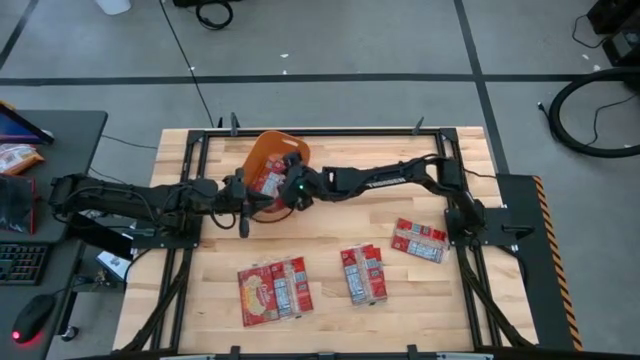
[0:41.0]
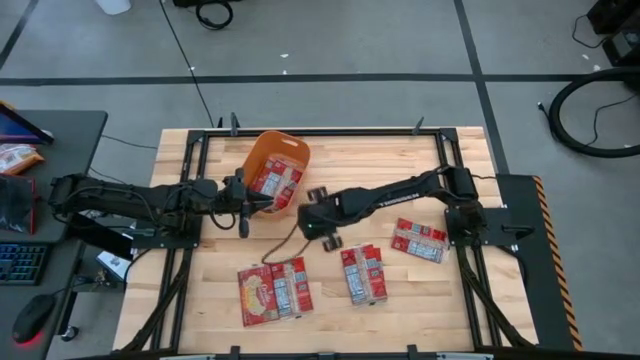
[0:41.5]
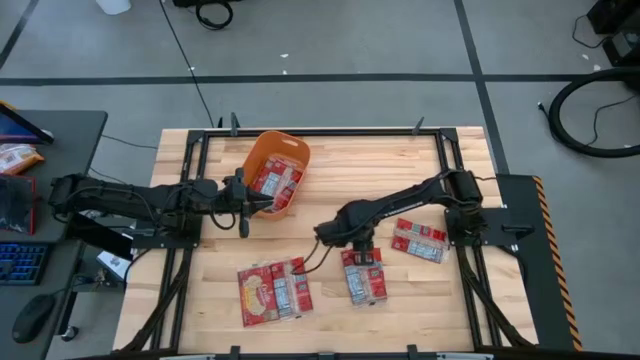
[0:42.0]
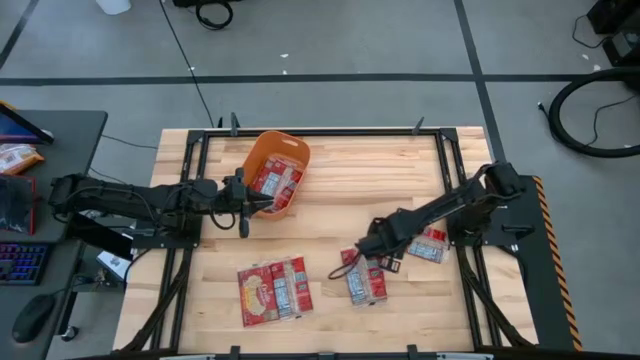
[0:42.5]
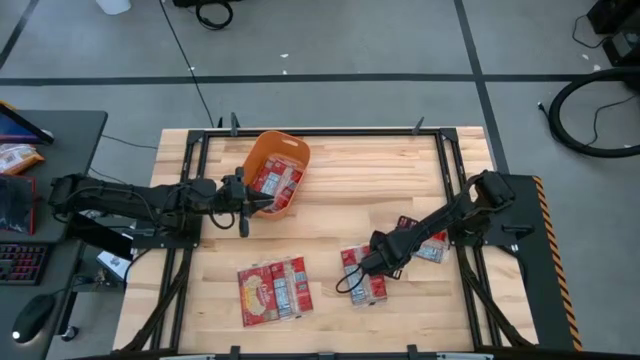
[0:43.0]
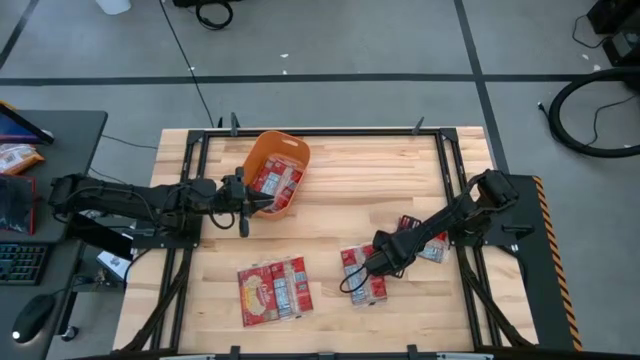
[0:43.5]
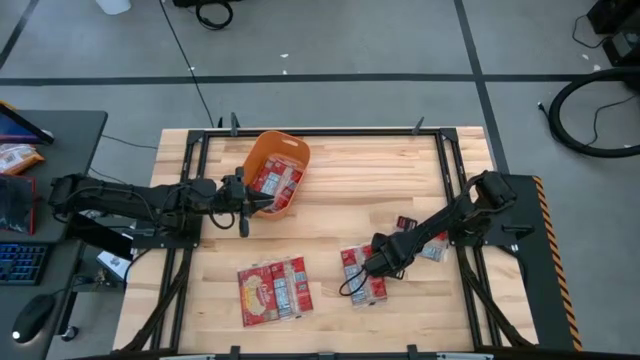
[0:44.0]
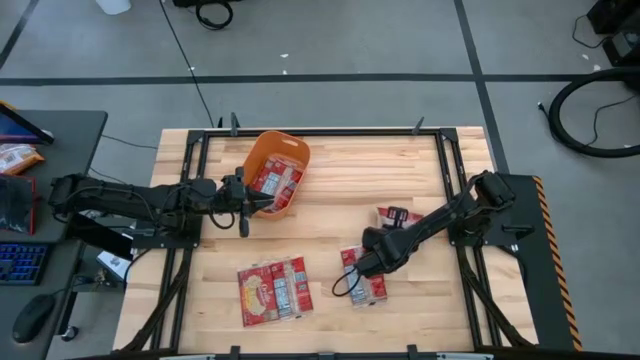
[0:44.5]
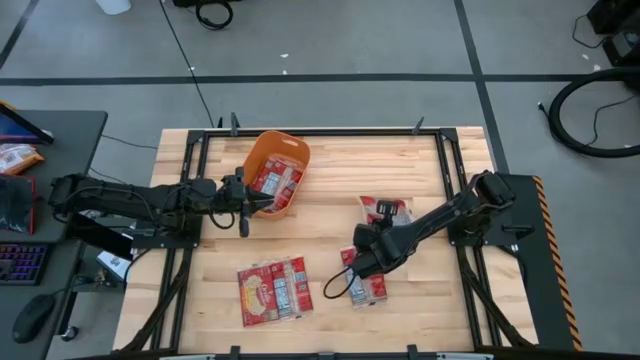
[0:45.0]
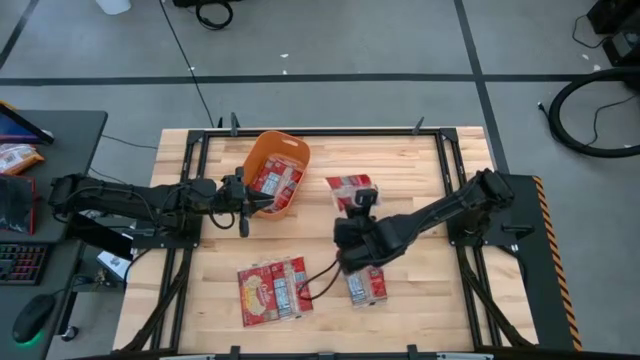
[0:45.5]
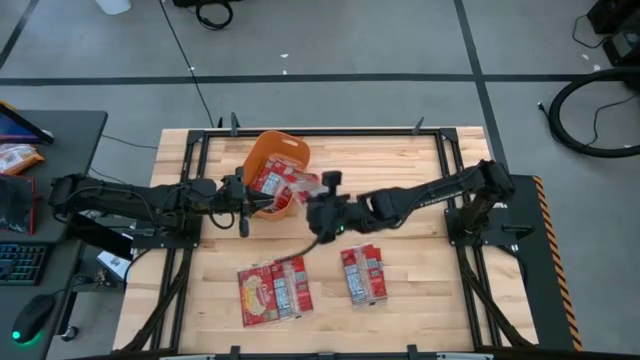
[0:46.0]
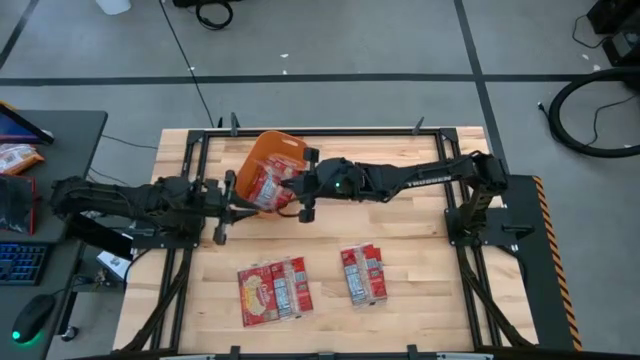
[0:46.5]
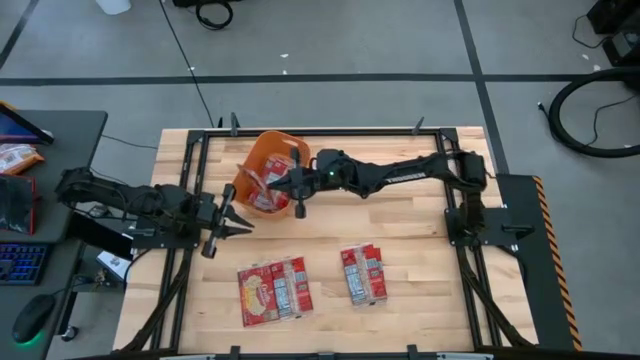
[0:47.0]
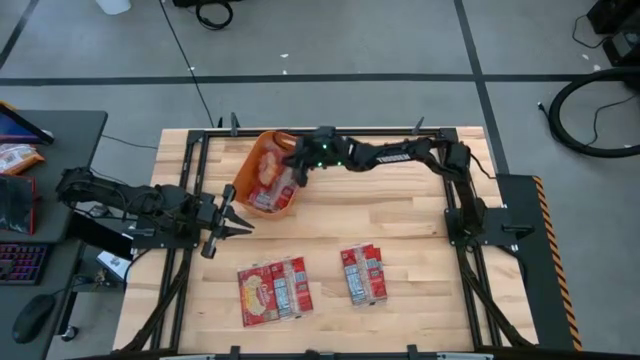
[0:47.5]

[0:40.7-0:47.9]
Task: Sort popcorn bags into baskets
Stack the popcorn pack on top of the other popcorn into the orange bin

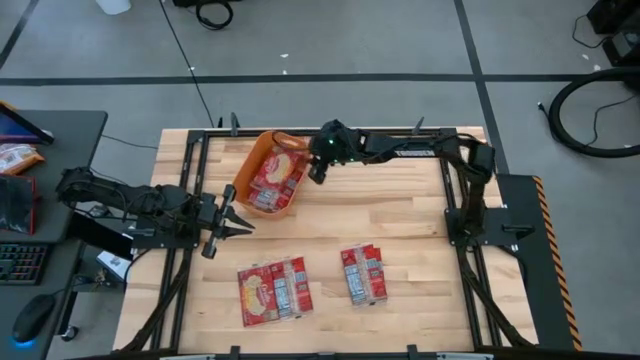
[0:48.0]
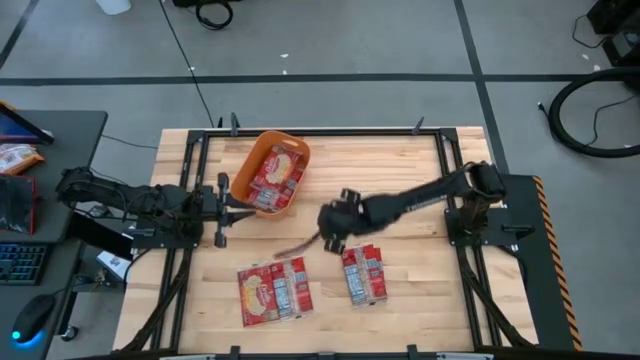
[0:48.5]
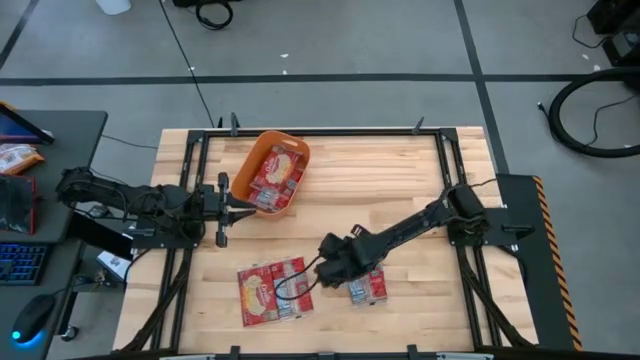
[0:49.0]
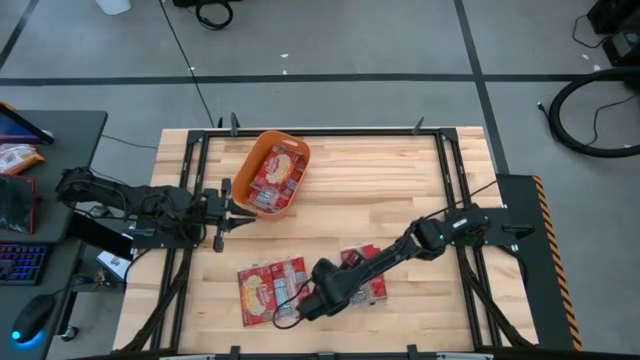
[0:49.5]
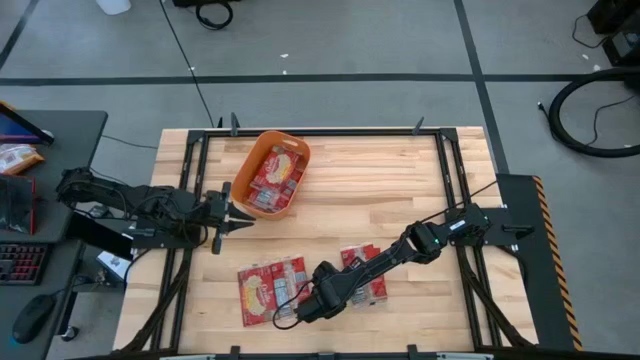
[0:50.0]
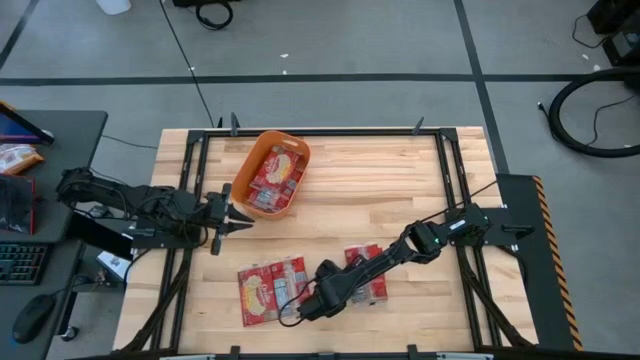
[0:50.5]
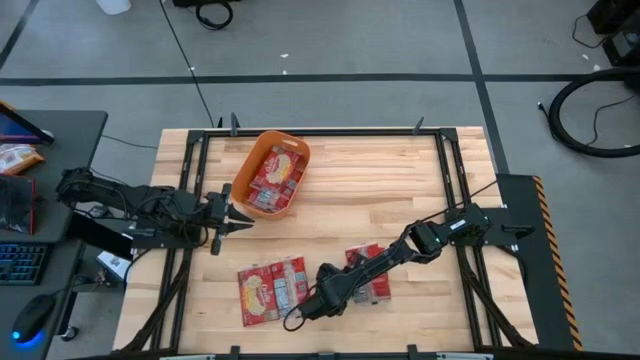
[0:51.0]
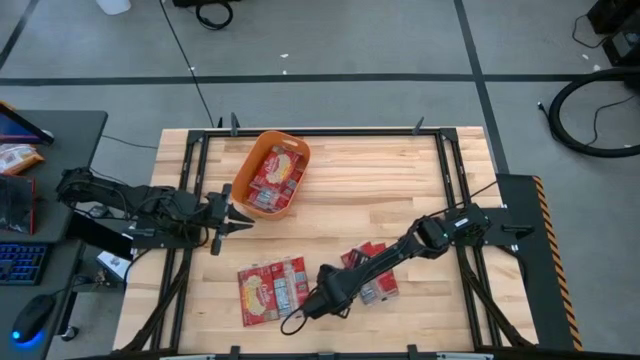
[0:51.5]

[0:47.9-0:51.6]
Stack the popcorn pack on top of the other popcorn into the orange bin

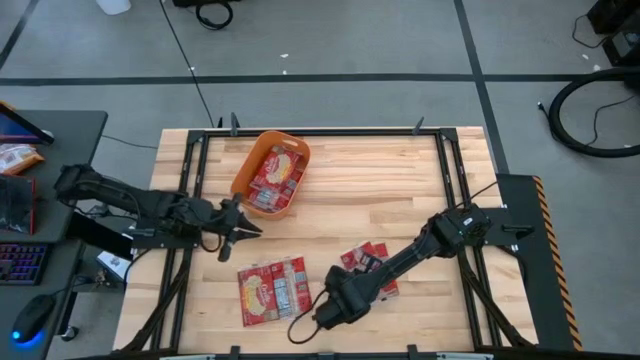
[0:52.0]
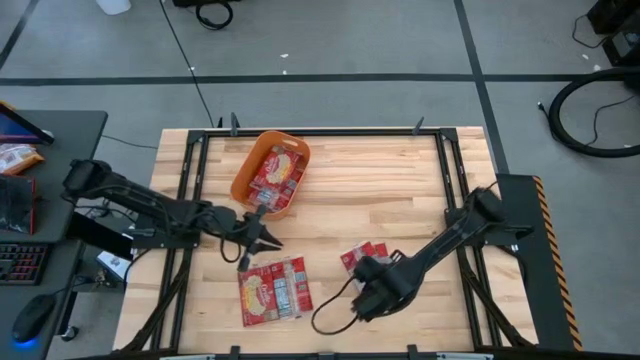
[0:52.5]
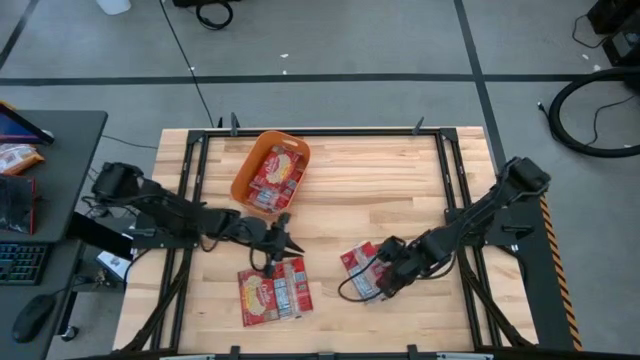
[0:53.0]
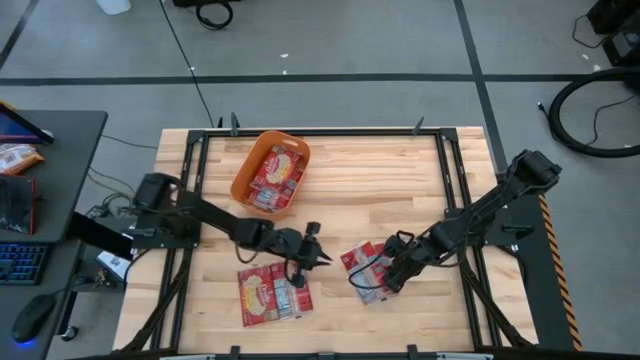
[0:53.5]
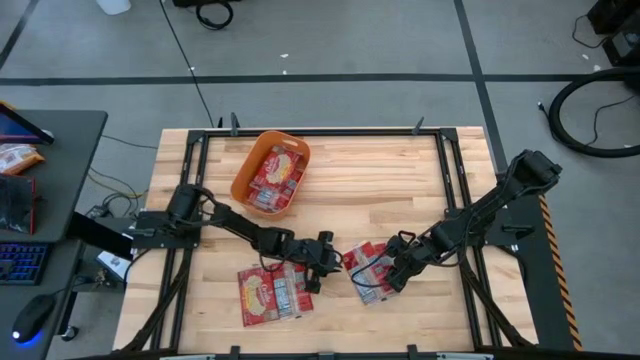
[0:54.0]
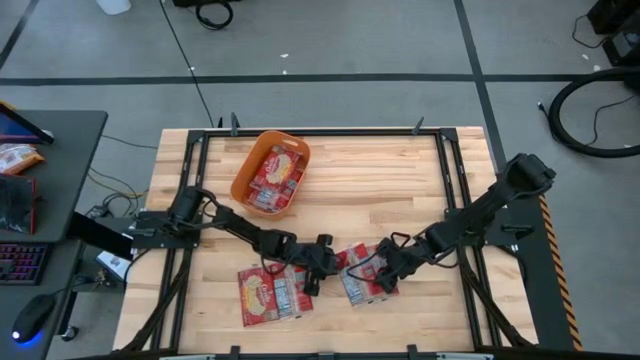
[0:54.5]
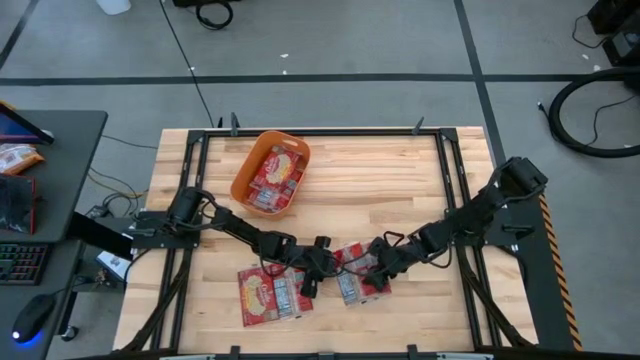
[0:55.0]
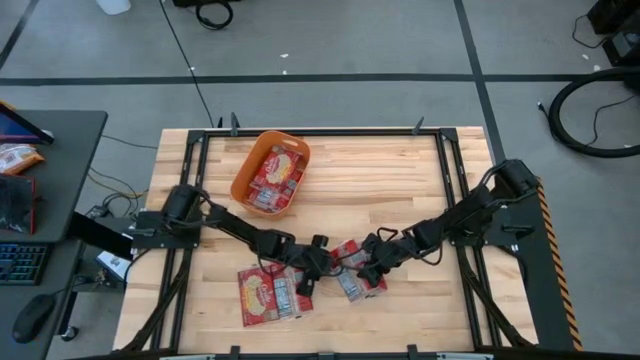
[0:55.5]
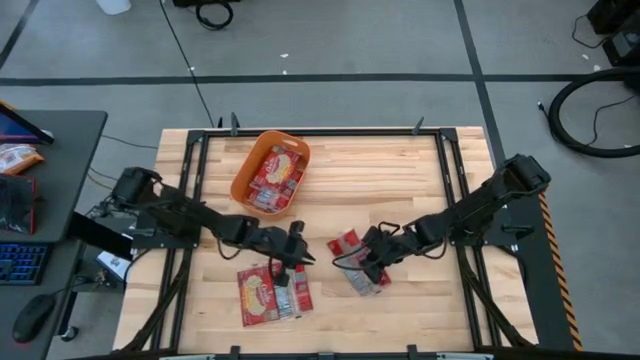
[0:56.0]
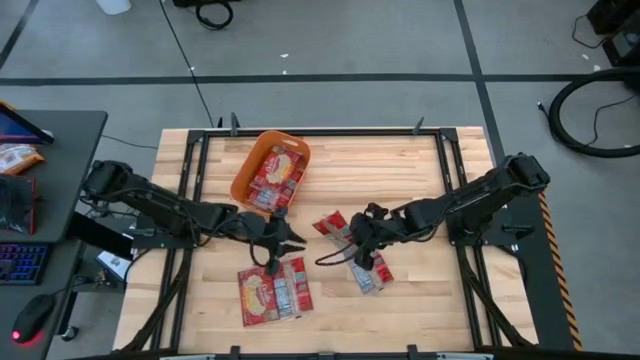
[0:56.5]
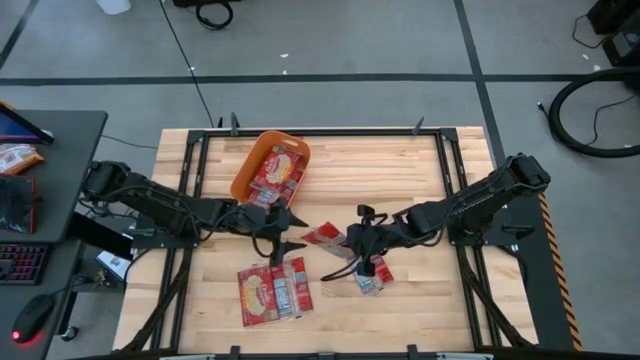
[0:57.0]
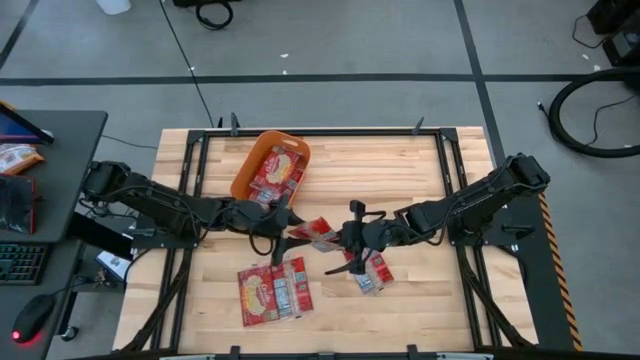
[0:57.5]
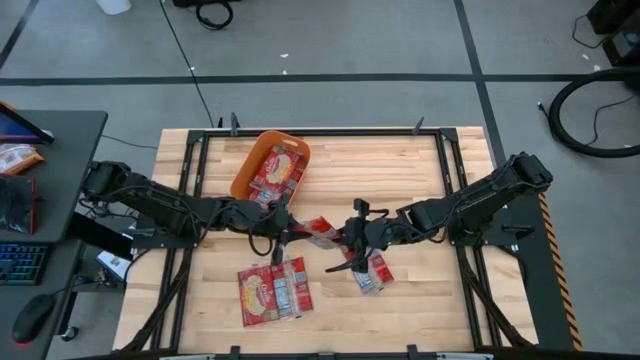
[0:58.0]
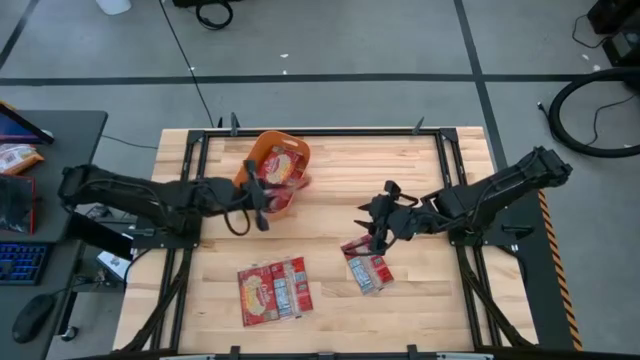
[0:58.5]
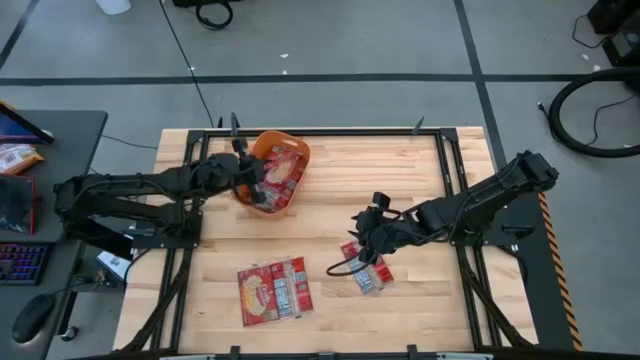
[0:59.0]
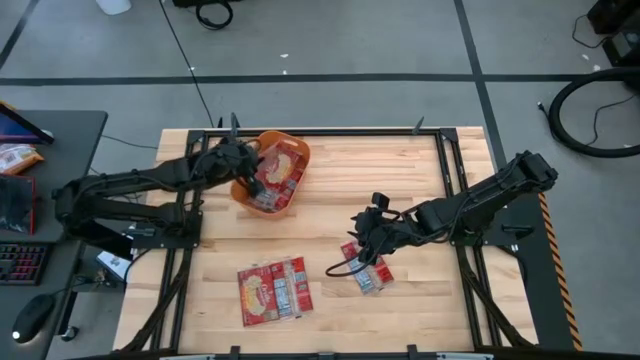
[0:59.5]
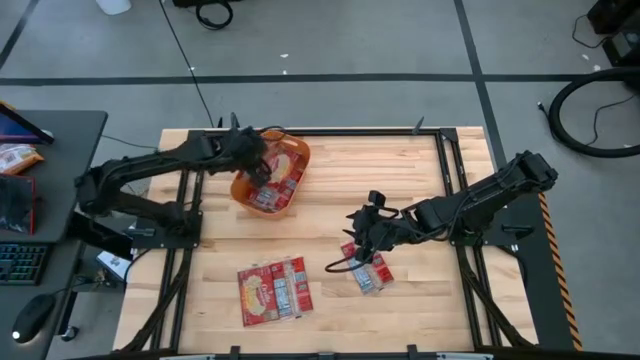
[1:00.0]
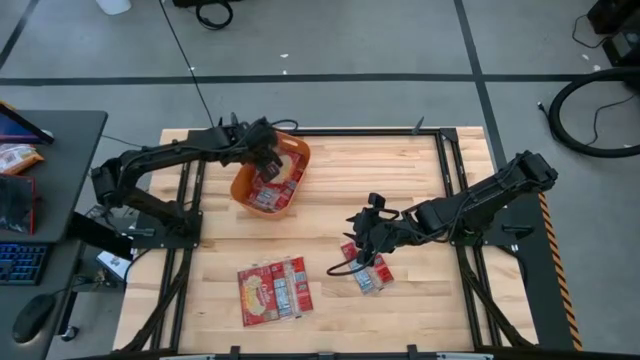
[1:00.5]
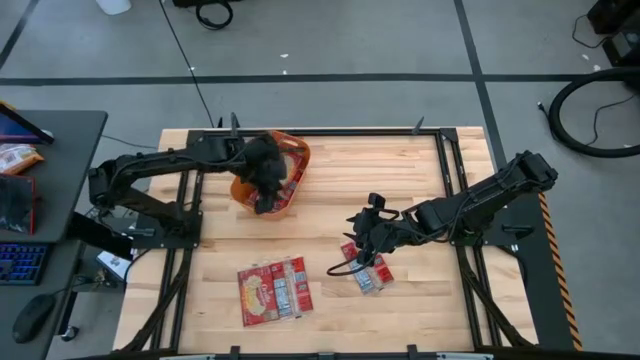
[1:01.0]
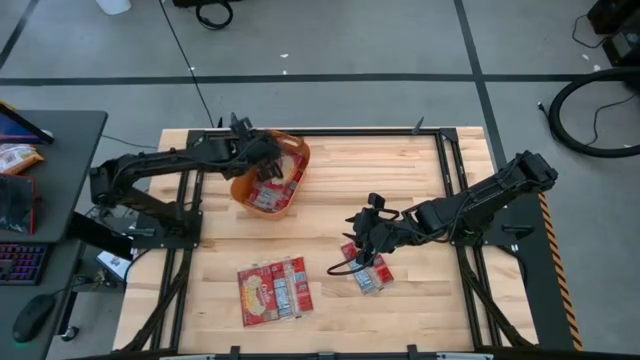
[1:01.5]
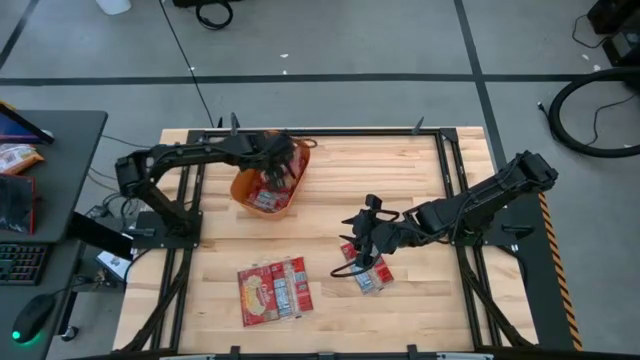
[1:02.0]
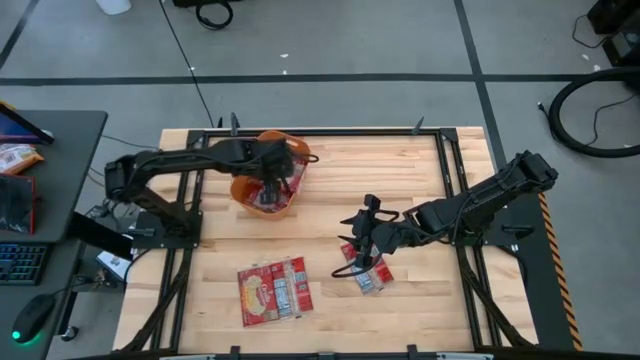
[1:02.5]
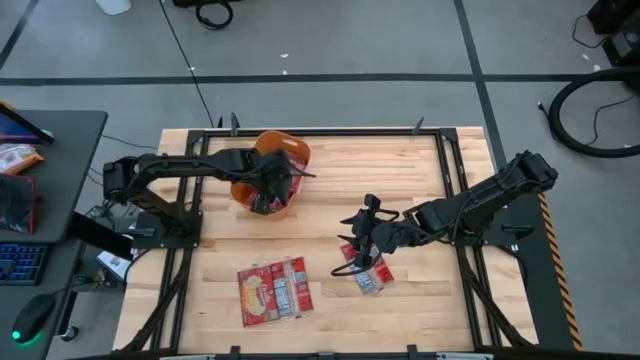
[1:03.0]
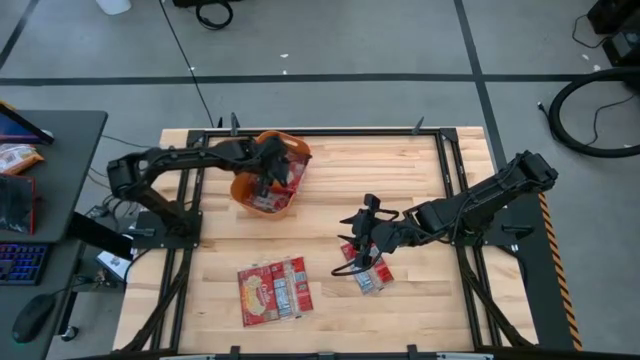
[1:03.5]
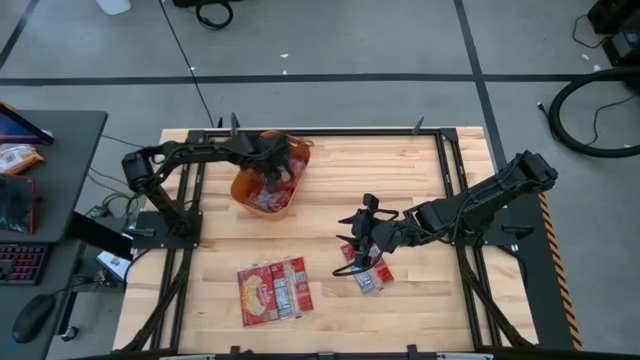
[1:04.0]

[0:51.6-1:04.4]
Stack the popcorn pack on top of the other popcorn into the orange bin
